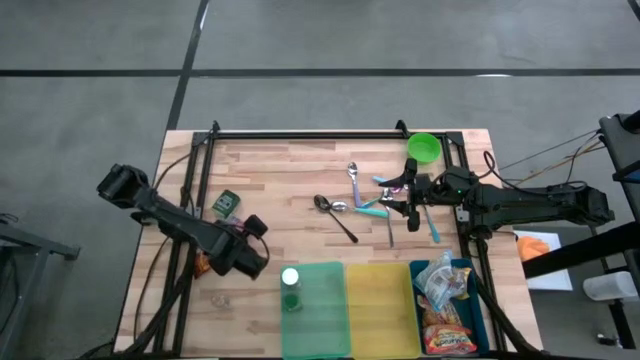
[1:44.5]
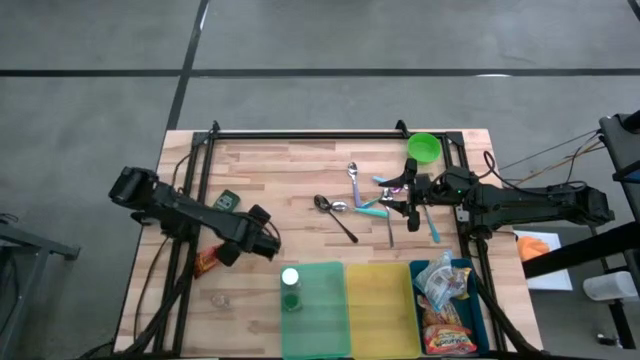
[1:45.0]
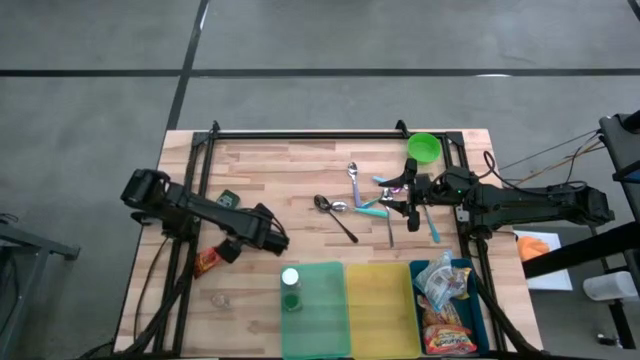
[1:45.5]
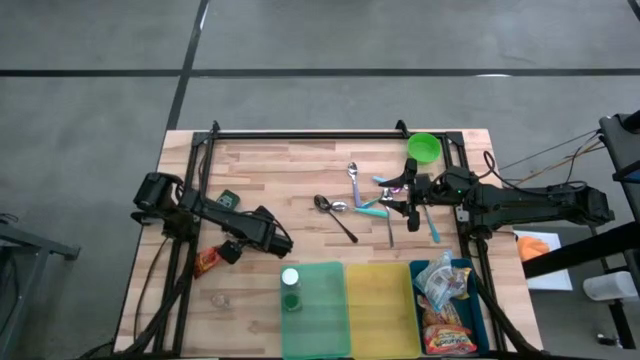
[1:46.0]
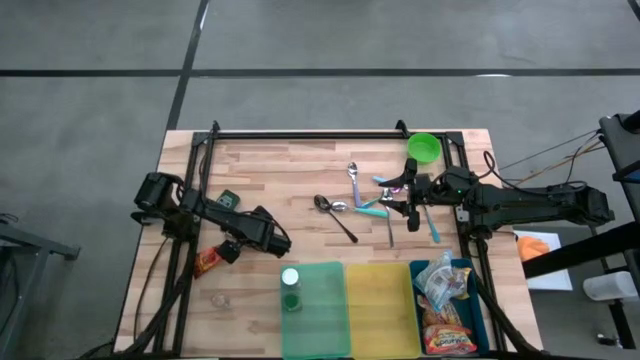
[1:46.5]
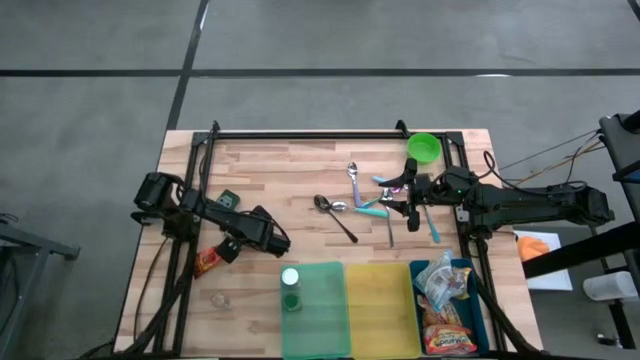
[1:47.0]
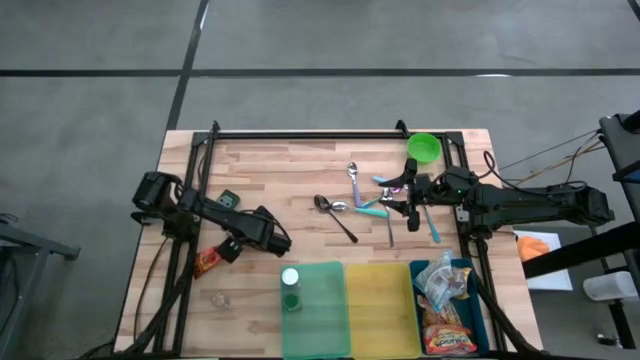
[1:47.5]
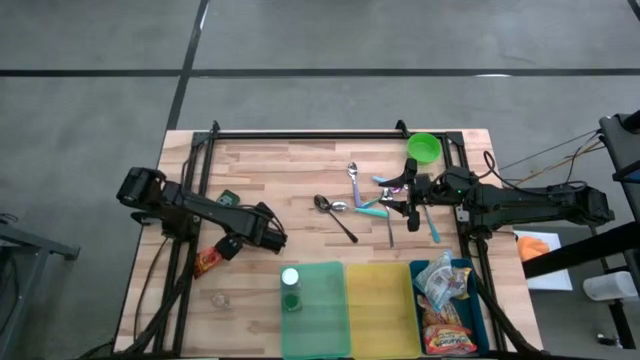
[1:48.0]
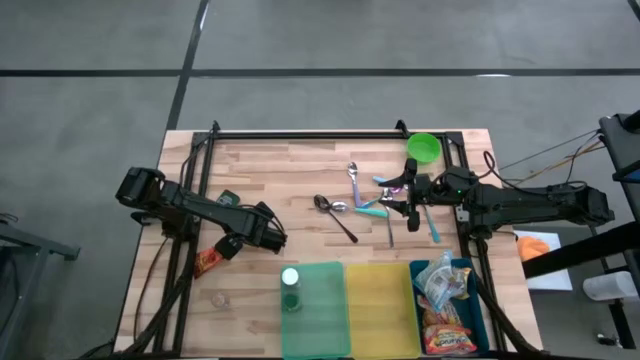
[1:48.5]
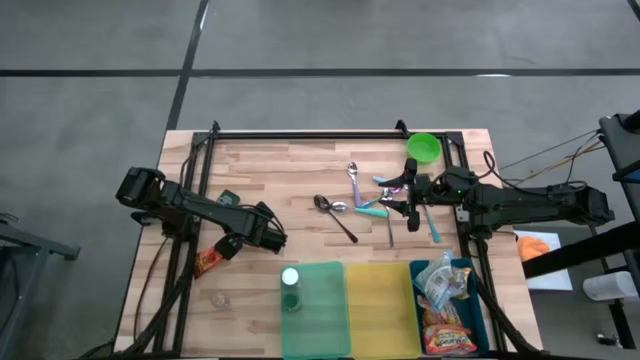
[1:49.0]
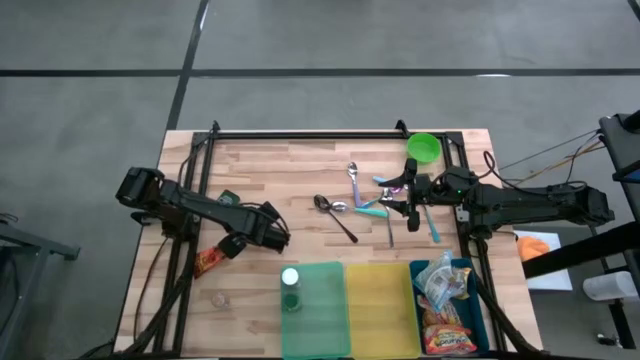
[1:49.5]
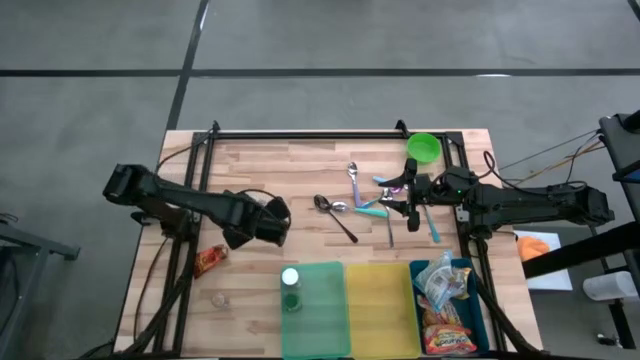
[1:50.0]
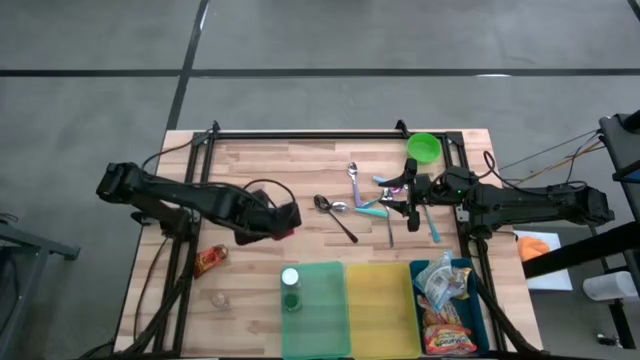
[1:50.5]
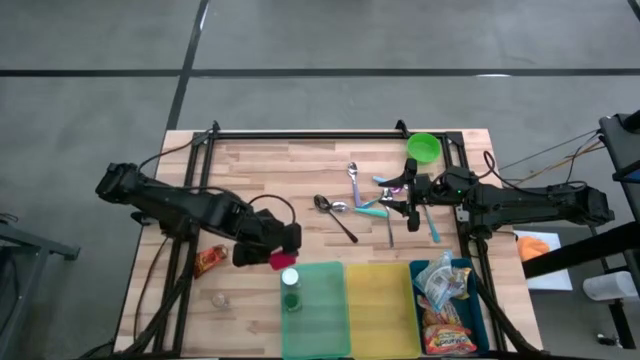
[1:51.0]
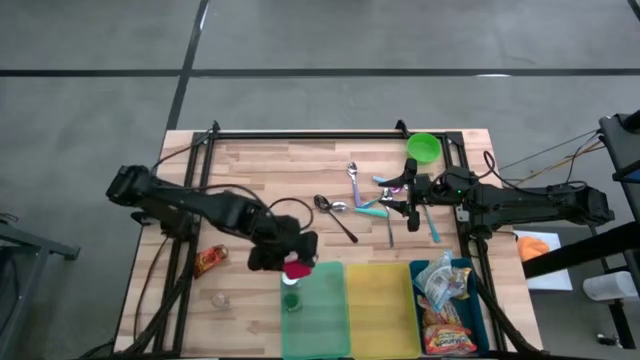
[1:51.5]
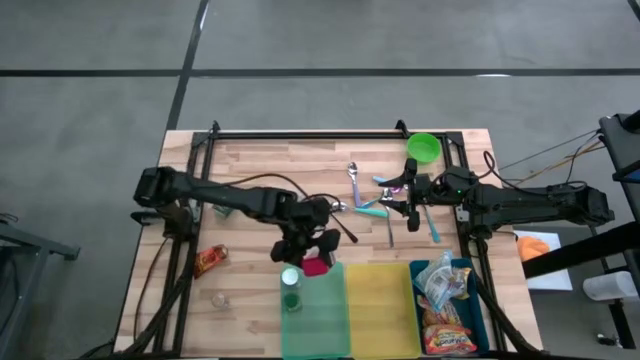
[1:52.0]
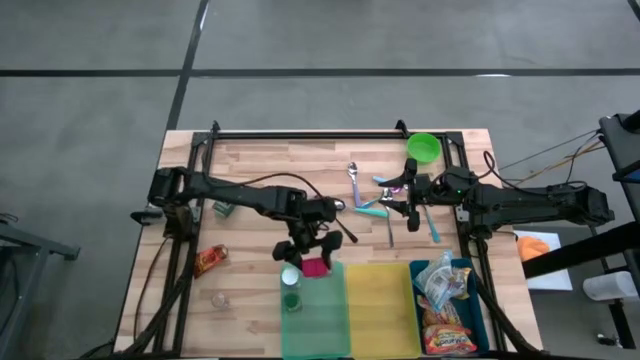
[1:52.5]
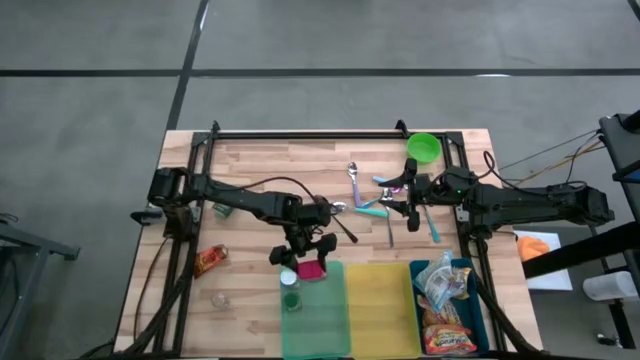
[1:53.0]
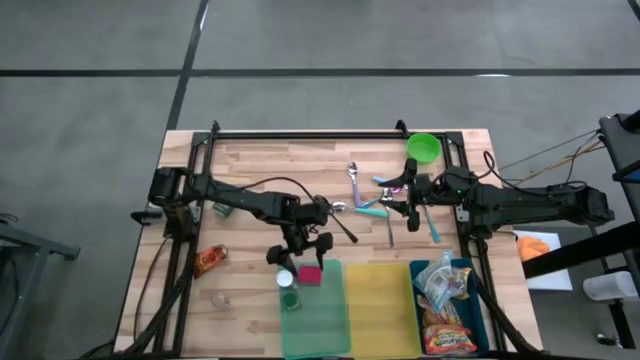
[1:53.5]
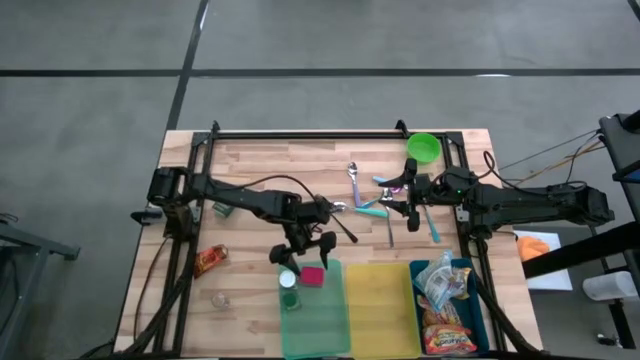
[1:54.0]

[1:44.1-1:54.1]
Put the red seasoning can into the green bin
